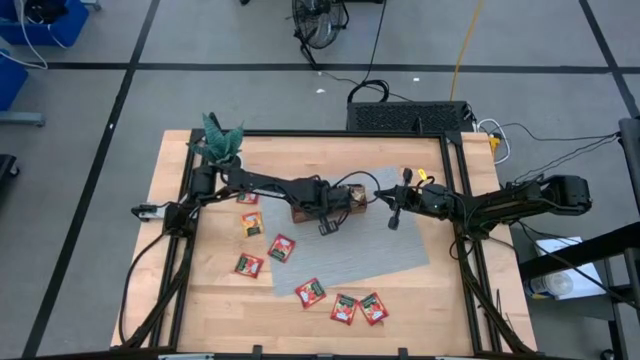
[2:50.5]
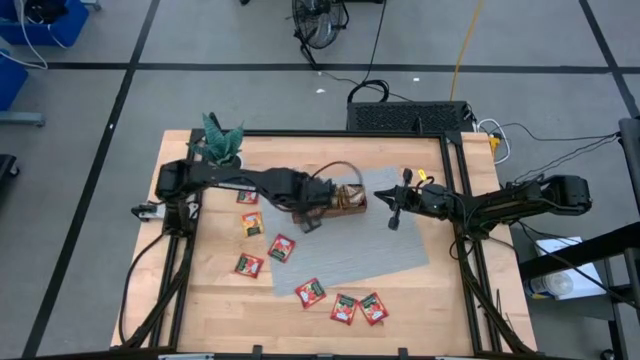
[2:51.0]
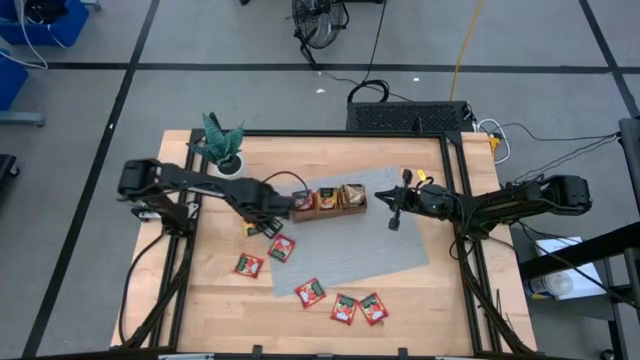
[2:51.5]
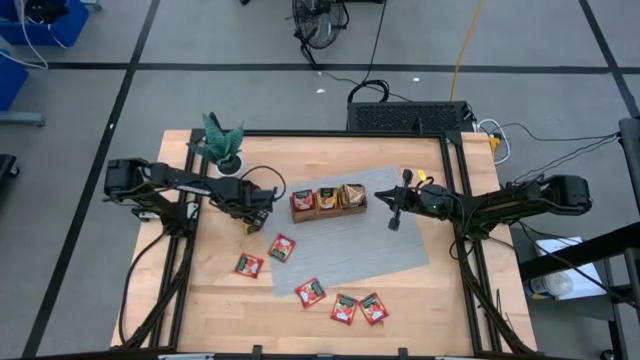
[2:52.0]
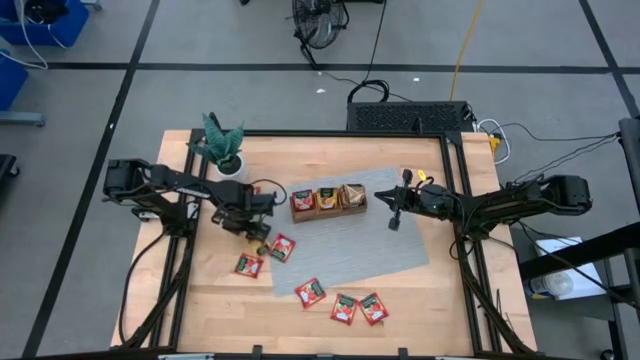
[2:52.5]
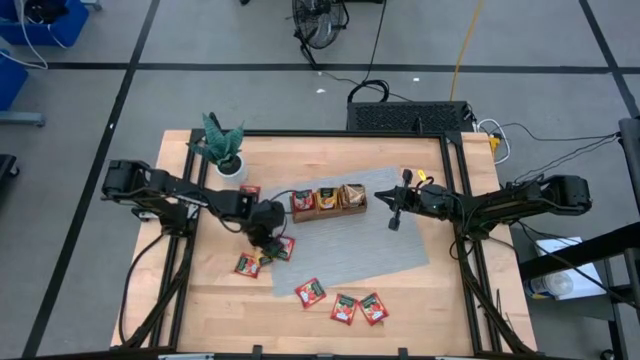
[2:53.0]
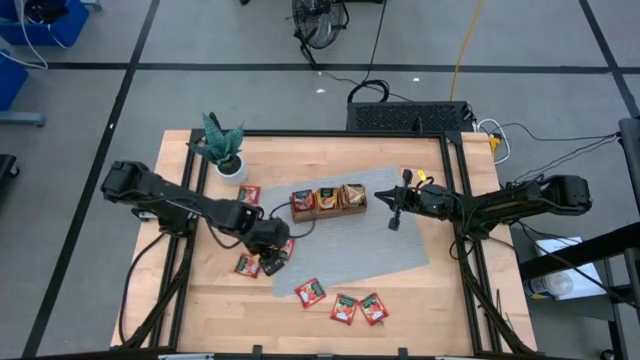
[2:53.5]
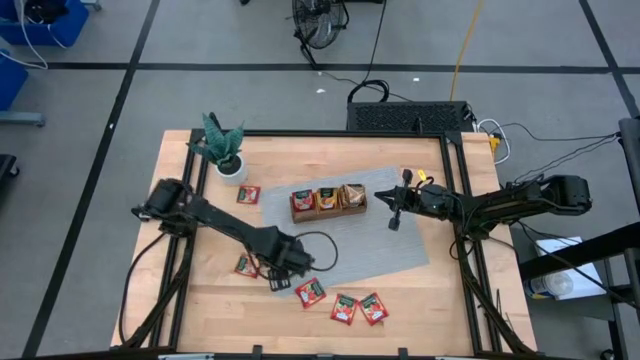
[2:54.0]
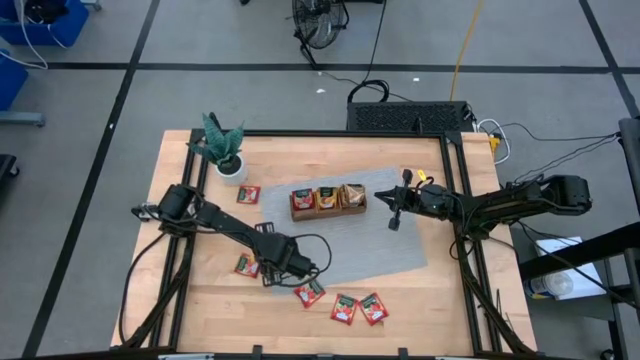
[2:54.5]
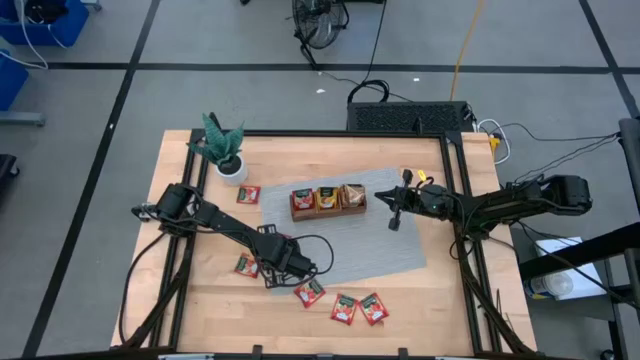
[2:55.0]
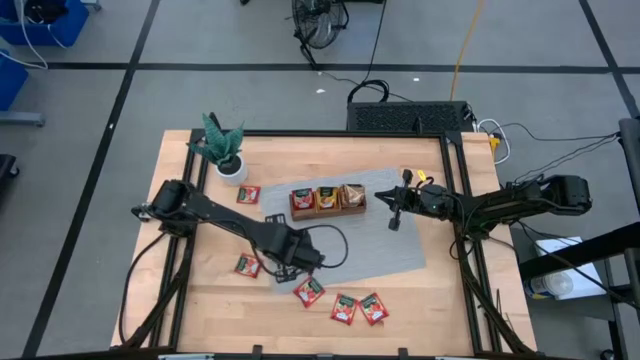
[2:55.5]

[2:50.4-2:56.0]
Task: Pick & Place Tea
Put the yellow tea into the middle part of the wooden organizer

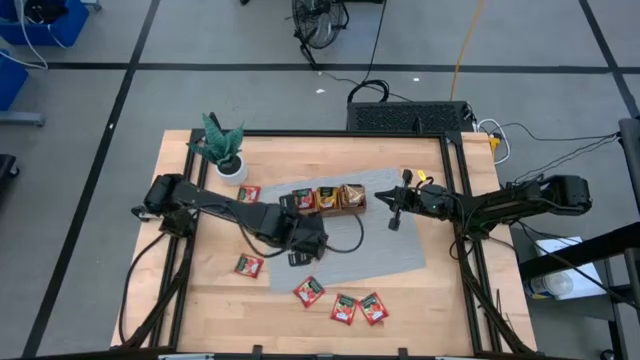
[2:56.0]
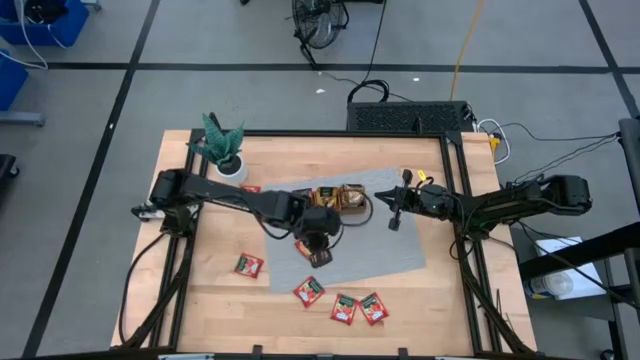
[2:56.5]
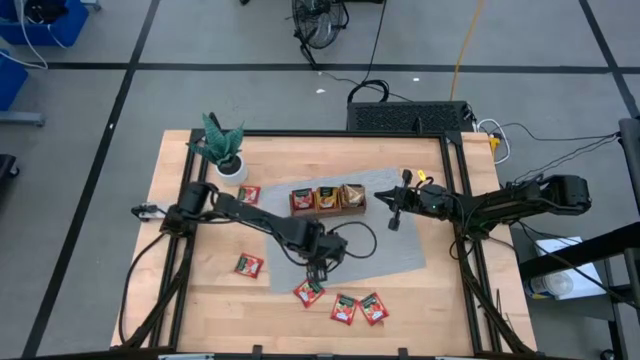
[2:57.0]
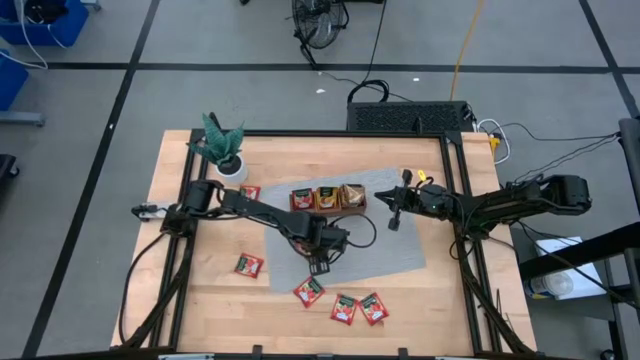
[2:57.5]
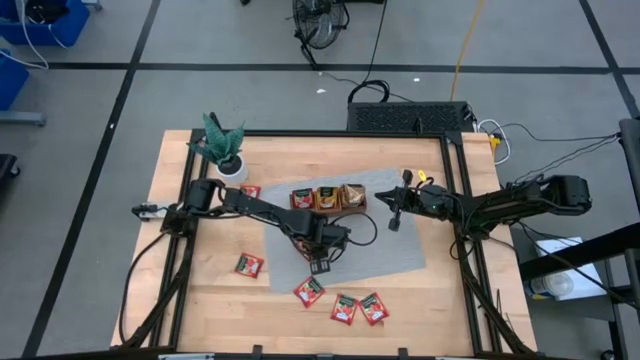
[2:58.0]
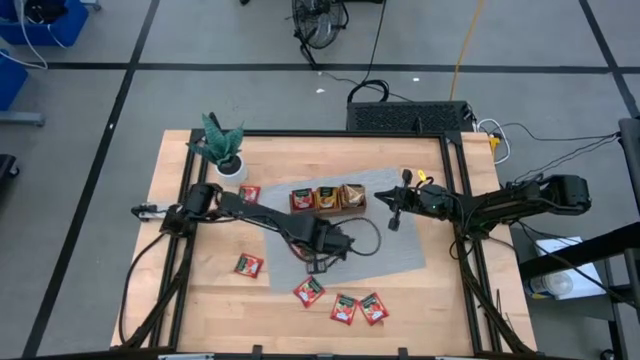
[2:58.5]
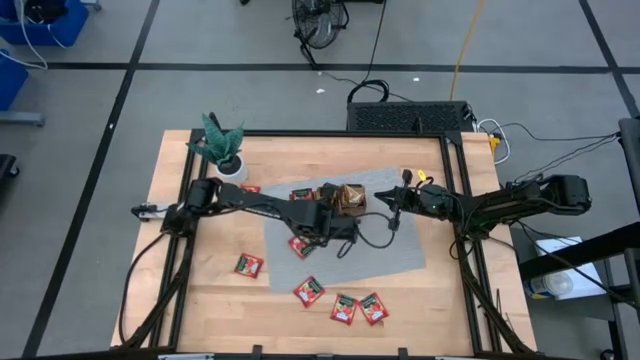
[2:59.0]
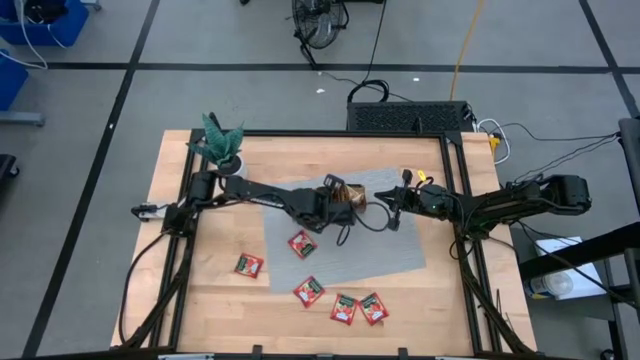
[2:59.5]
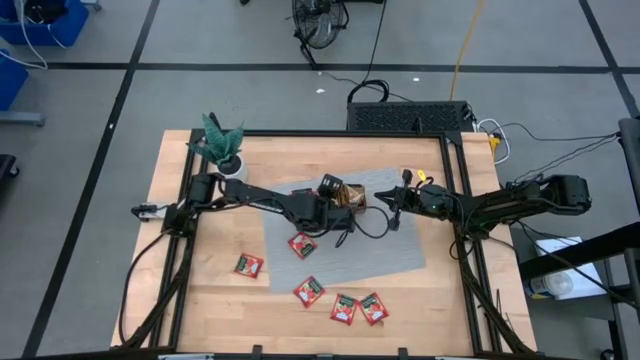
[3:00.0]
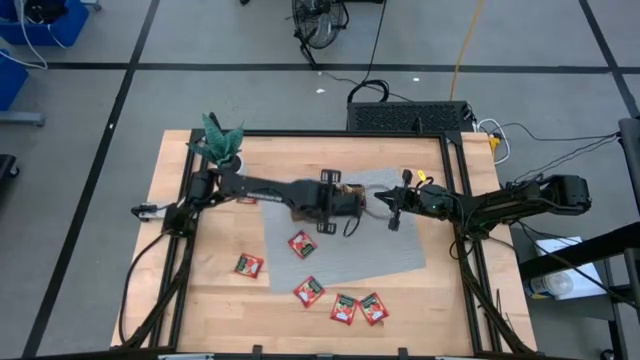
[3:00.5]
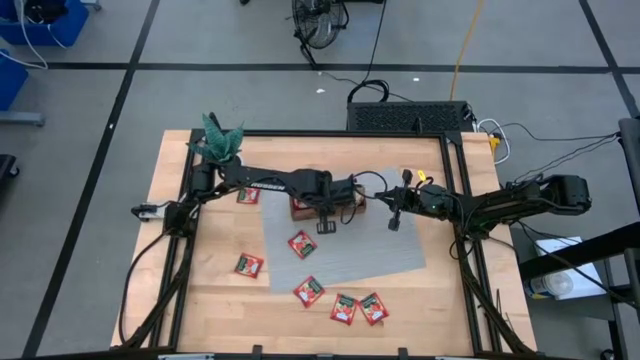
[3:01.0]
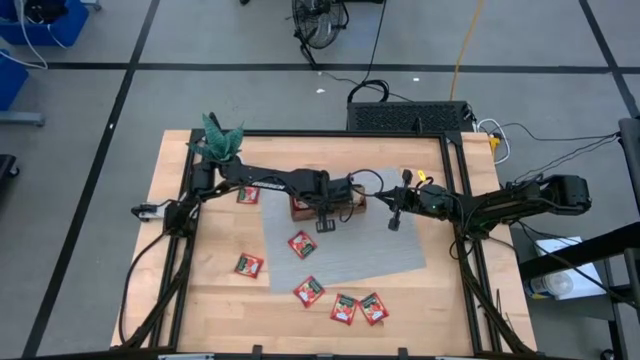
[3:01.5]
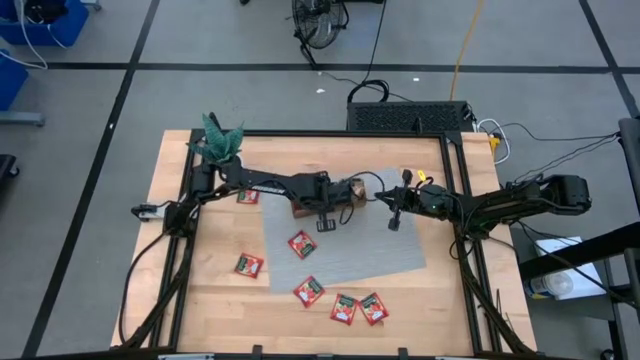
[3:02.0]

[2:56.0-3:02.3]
Put the yellow tea into the middle part of the wooden organizer

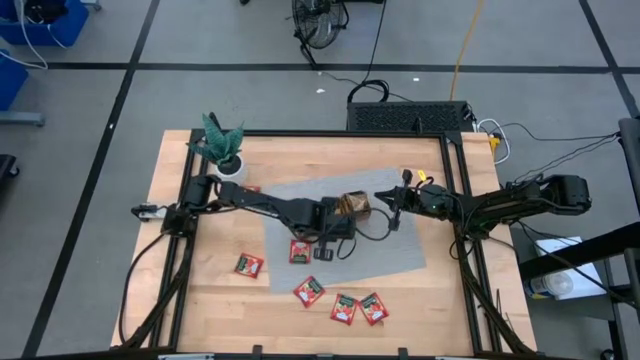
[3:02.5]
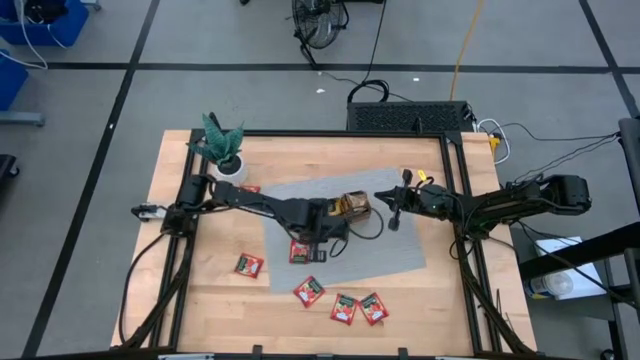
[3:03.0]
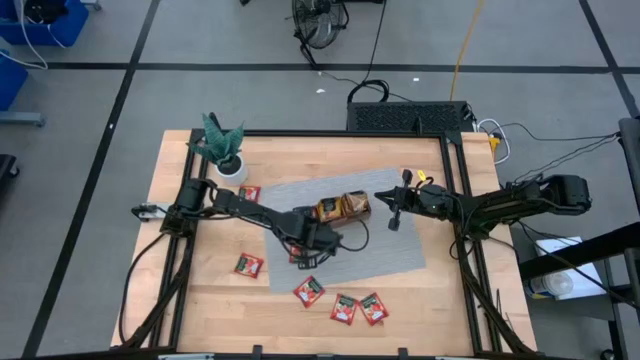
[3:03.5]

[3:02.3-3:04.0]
Adjust the wooden organizer

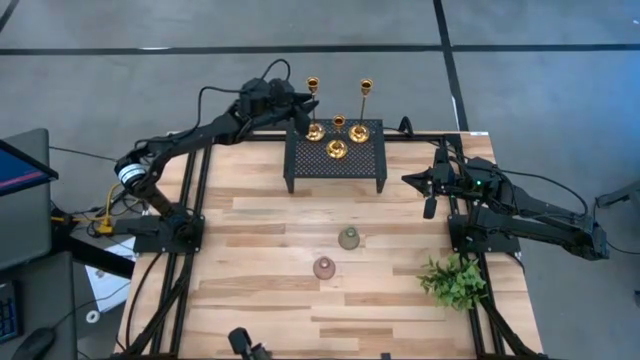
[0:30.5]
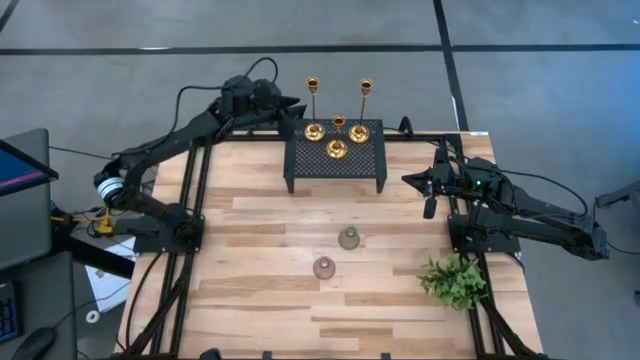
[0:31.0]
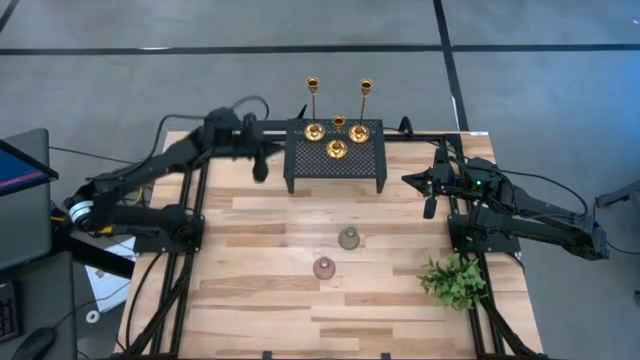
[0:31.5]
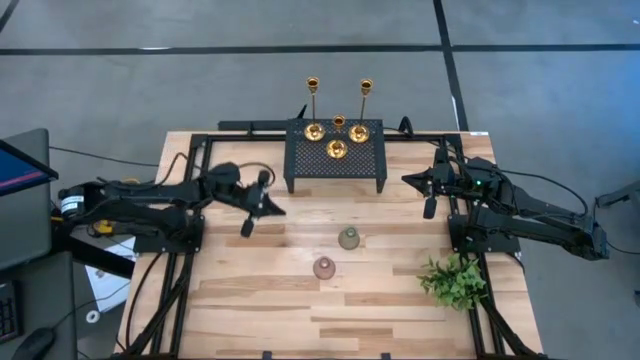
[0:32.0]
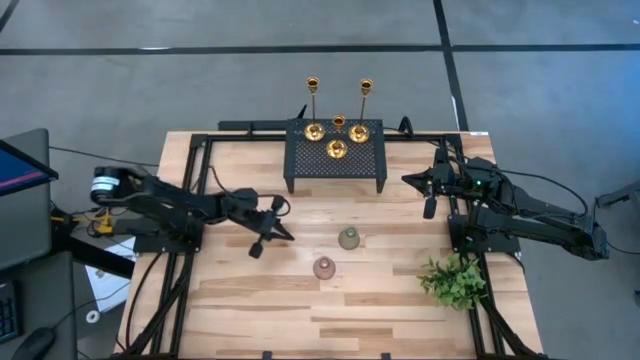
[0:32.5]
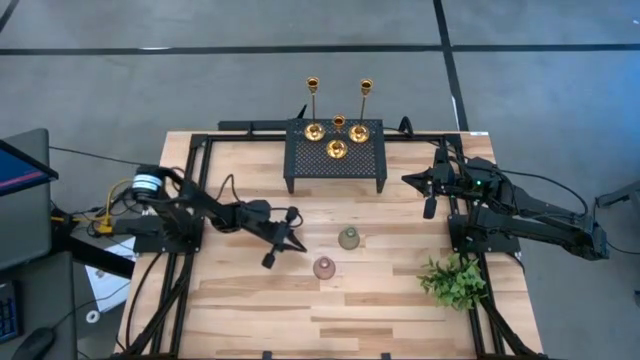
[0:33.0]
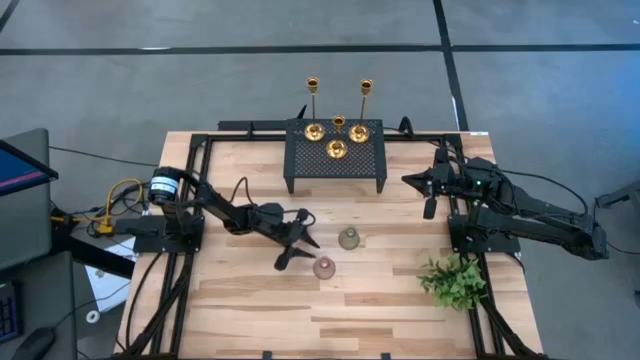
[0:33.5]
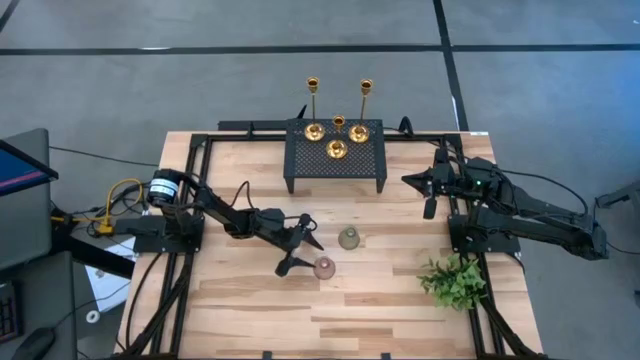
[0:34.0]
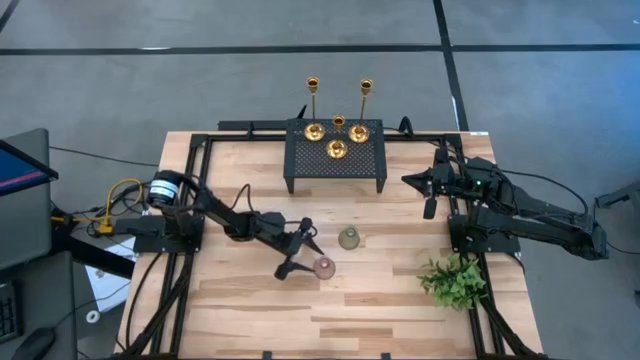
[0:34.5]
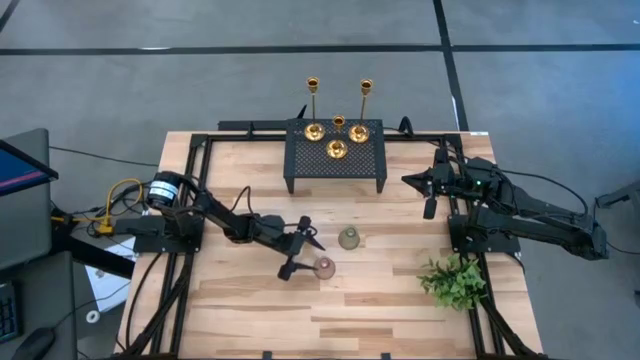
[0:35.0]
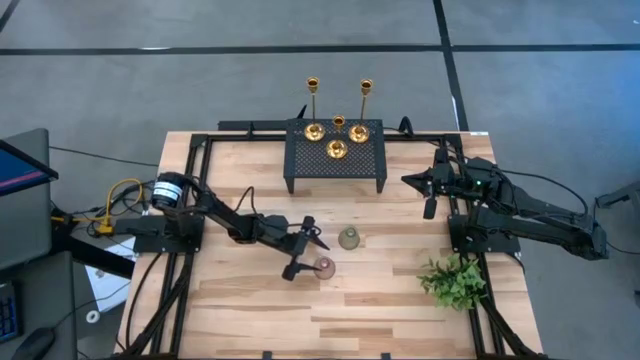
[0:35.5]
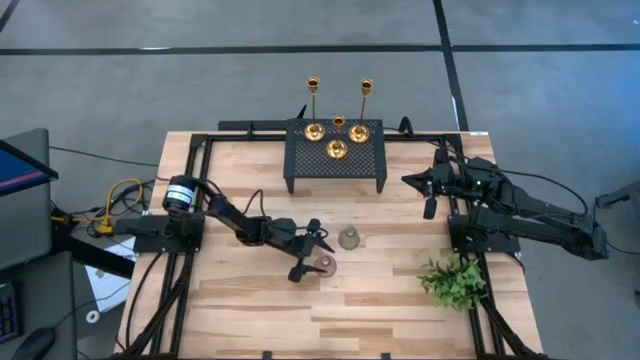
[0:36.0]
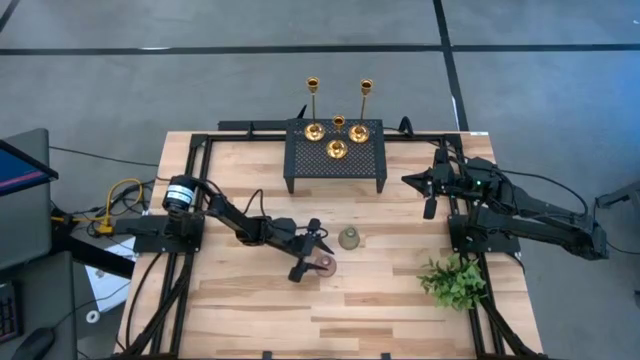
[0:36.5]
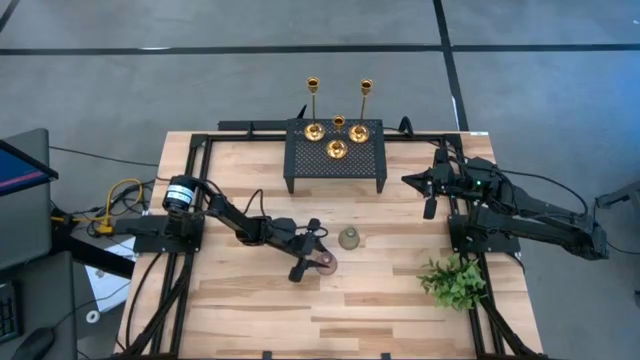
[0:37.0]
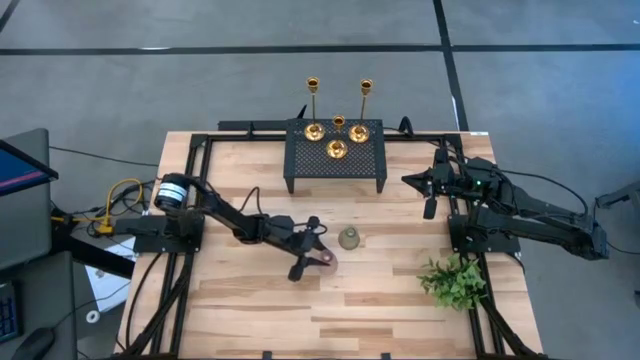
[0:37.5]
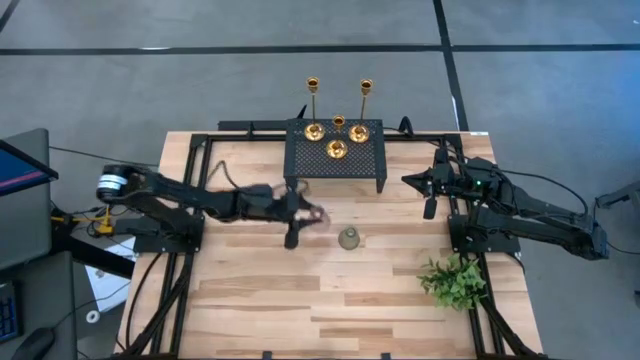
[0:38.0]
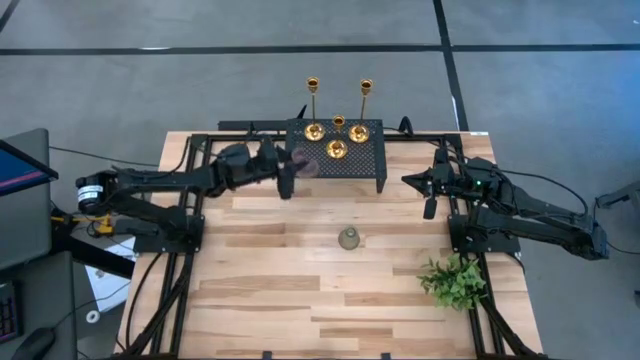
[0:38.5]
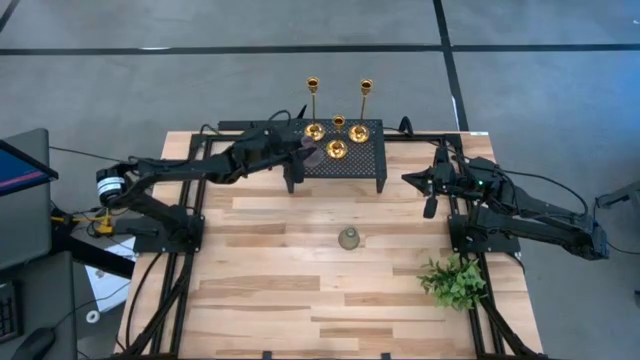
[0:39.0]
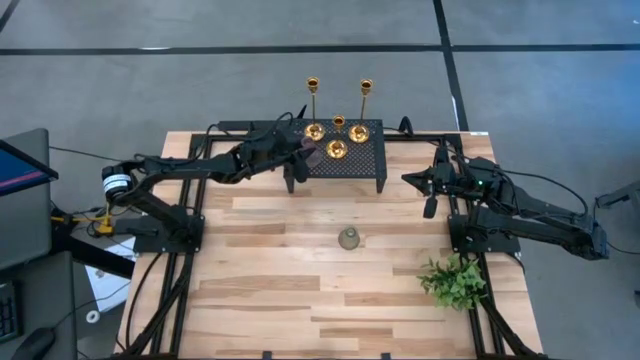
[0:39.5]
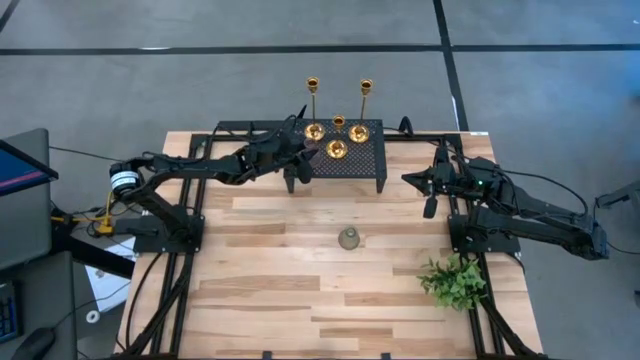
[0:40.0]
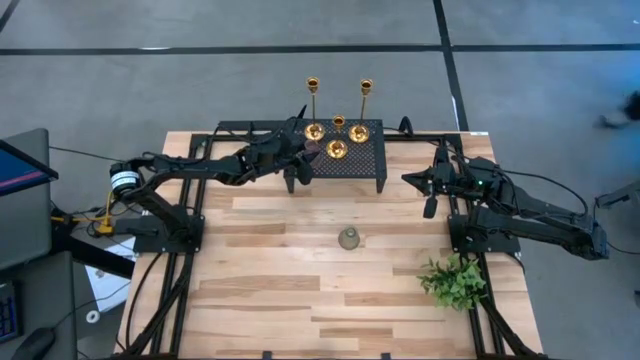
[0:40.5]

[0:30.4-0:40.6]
Task: Pick & Place candle stick holders
Put the purple glass candle holder on the shelf
